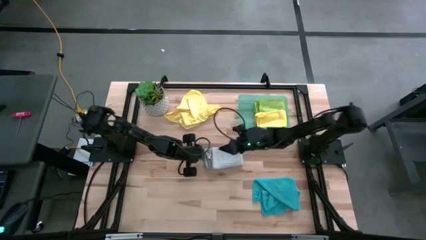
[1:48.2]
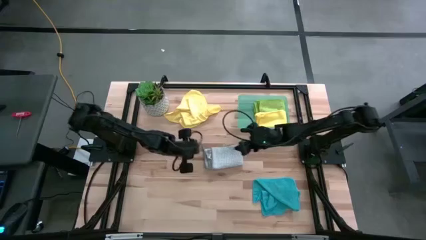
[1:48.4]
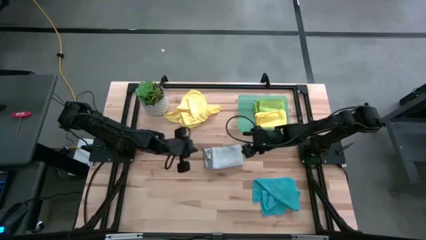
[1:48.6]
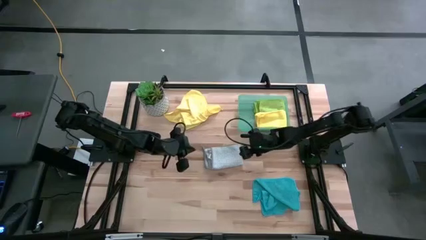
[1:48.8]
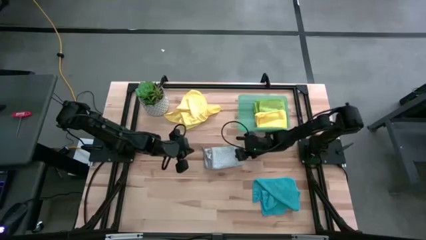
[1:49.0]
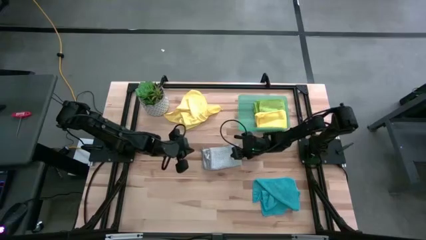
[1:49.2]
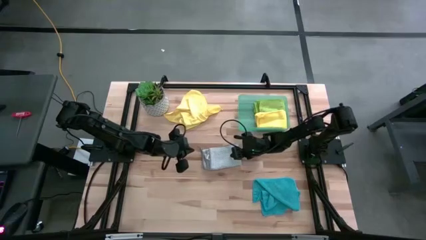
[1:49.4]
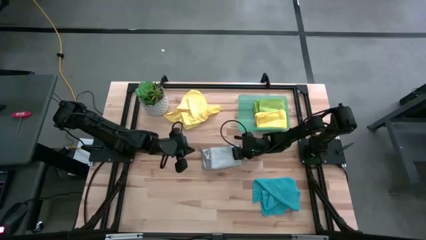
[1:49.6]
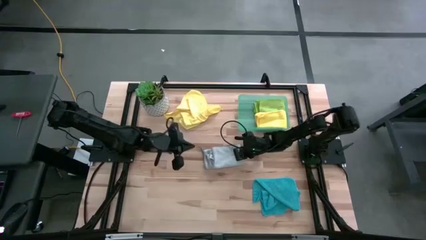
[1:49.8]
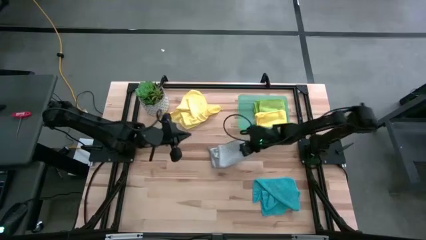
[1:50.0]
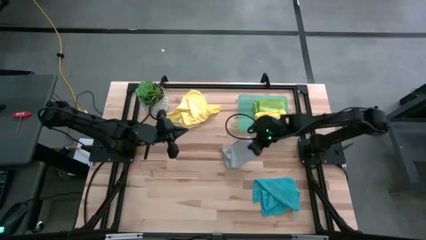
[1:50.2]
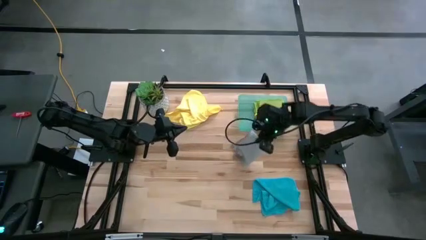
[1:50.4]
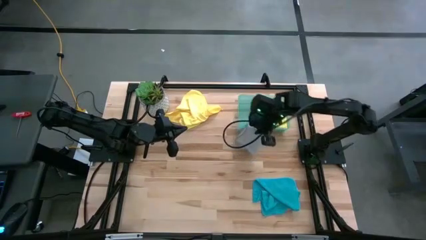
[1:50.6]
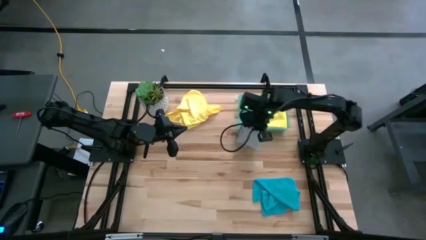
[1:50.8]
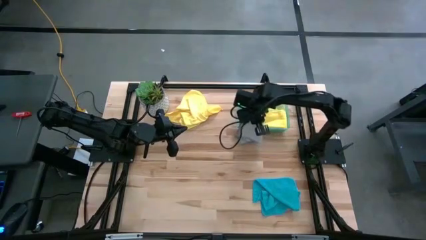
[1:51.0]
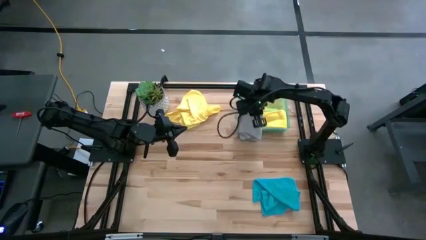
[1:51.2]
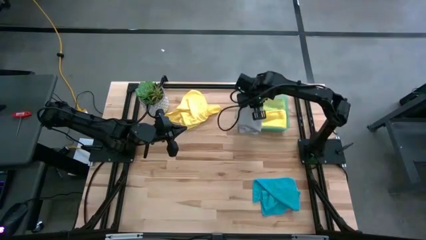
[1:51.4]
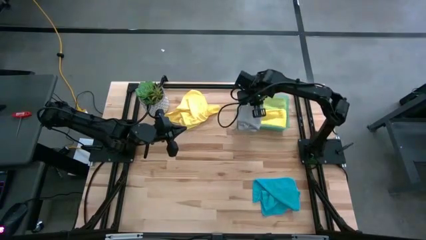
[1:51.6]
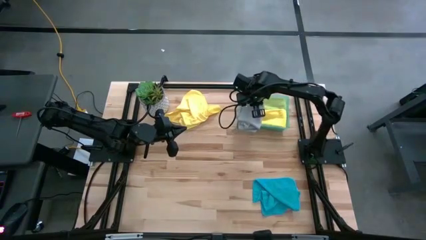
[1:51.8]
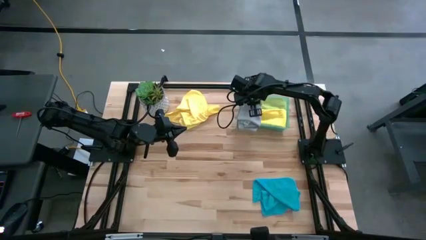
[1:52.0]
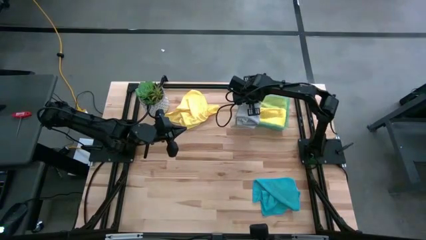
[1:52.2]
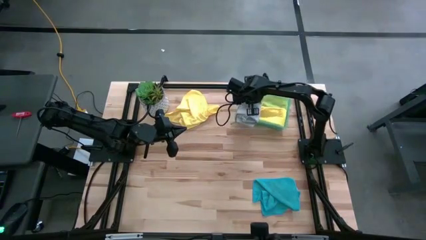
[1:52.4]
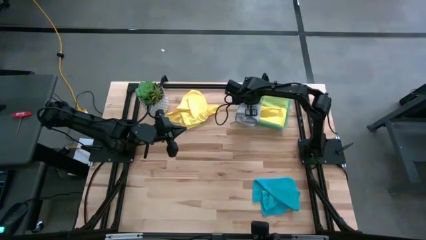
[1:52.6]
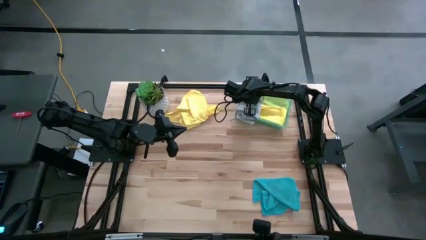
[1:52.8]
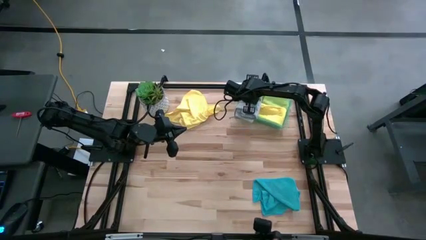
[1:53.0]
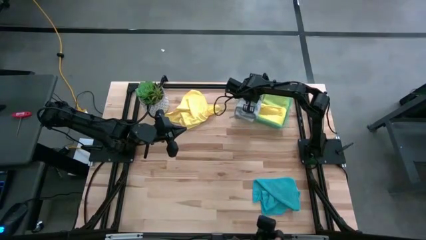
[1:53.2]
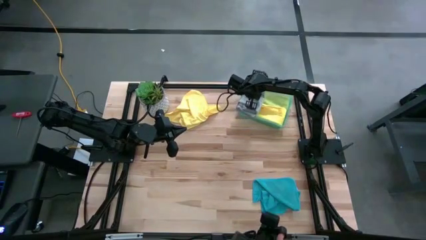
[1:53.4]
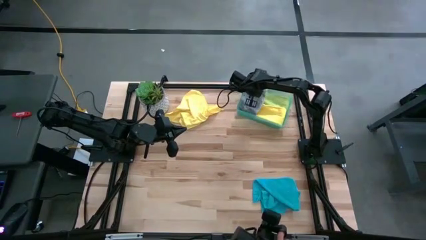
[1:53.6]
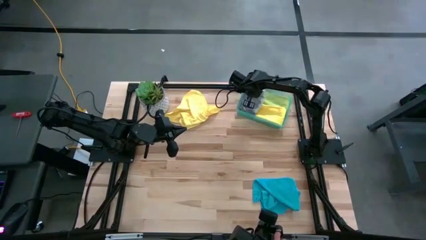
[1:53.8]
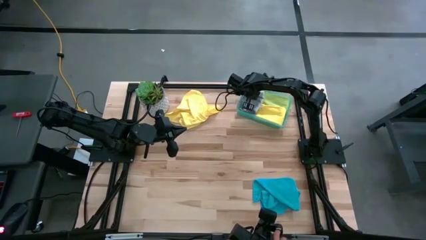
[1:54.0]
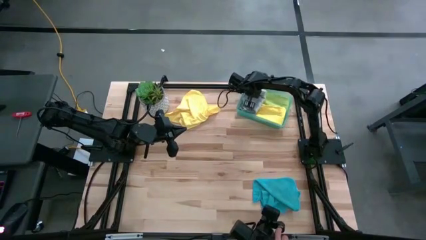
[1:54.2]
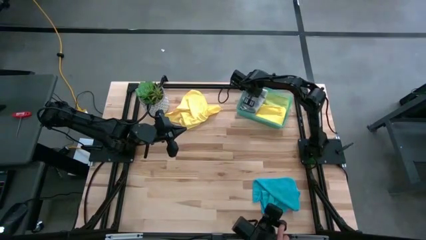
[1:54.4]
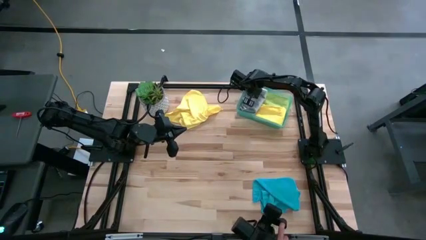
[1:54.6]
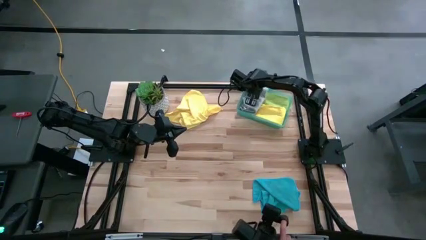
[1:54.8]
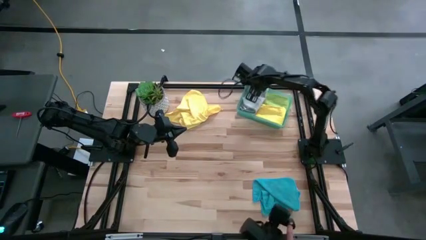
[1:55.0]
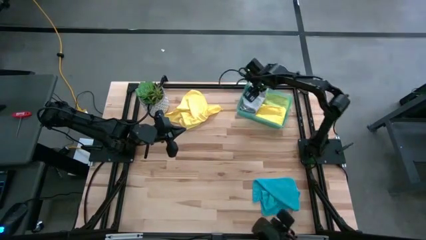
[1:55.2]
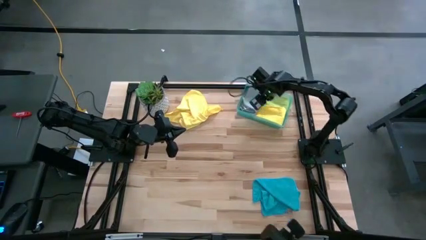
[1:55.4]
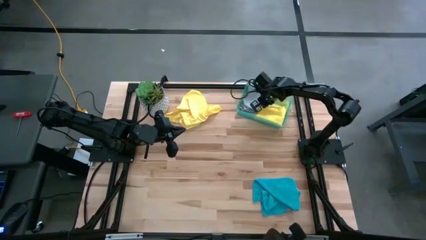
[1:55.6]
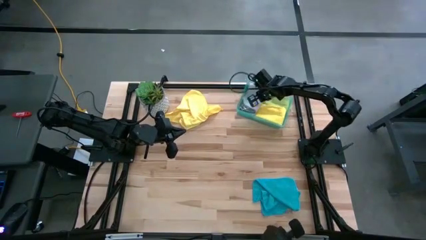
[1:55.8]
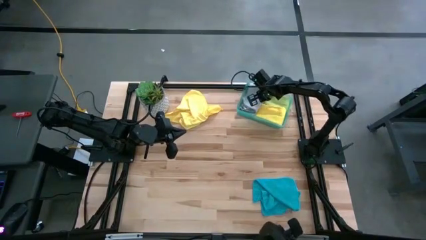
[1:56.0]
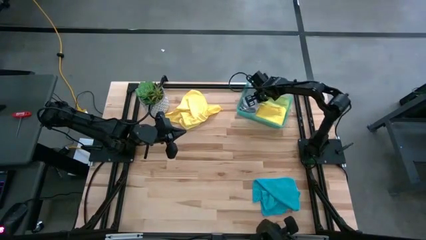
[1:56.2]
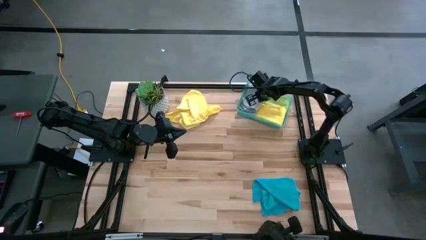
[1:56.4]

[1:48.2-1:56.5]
Task: Fold microfiber towels
Put the gray towel into the bin

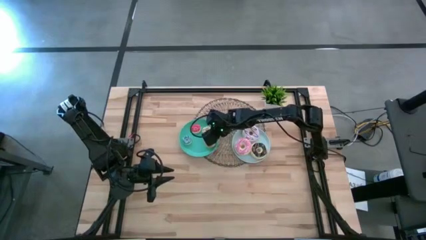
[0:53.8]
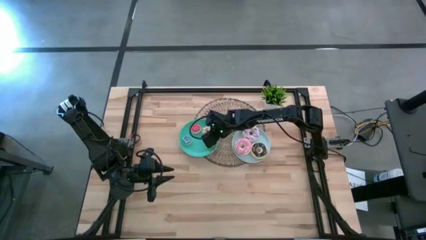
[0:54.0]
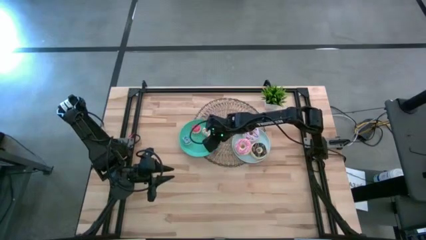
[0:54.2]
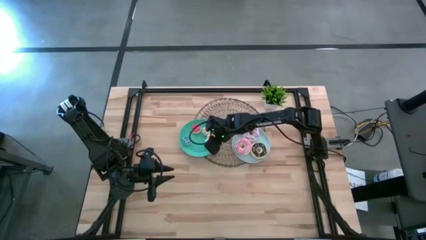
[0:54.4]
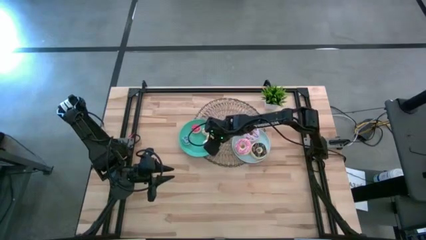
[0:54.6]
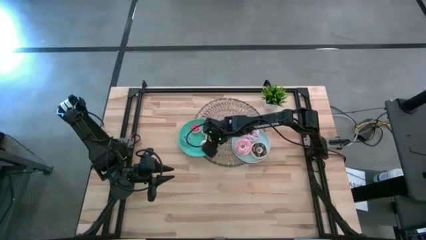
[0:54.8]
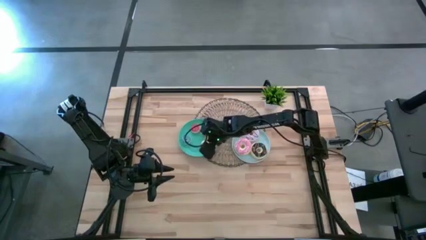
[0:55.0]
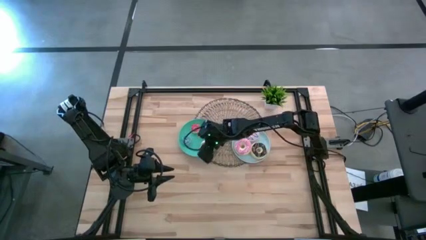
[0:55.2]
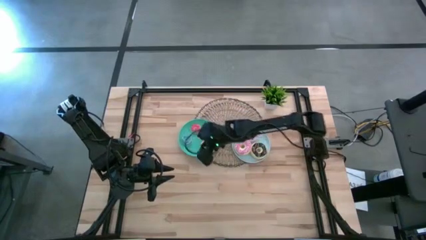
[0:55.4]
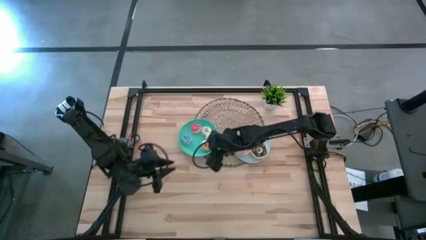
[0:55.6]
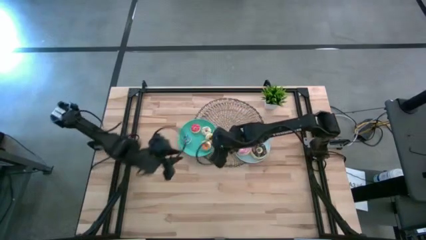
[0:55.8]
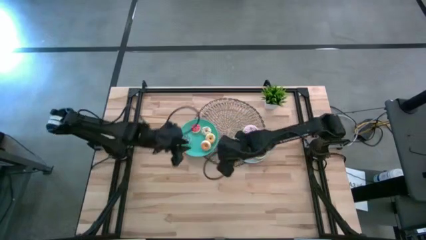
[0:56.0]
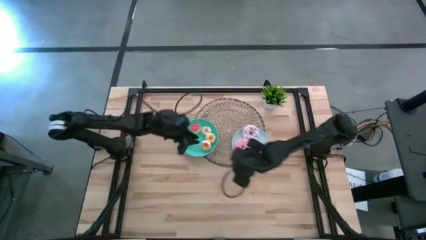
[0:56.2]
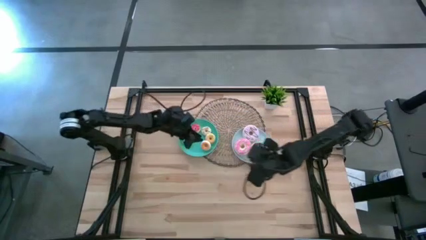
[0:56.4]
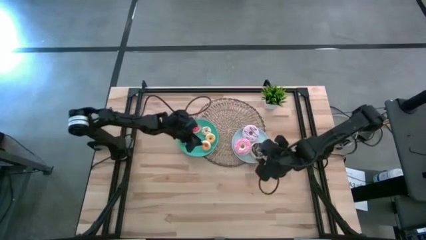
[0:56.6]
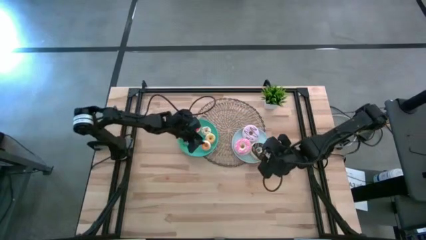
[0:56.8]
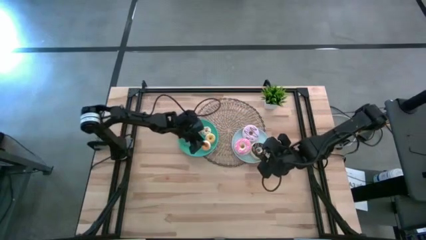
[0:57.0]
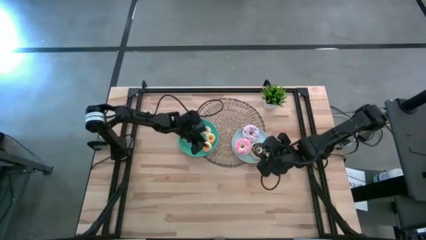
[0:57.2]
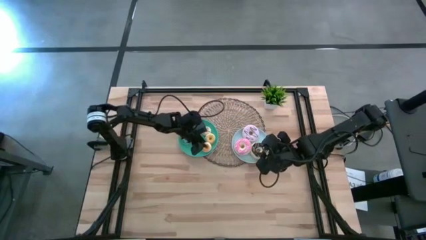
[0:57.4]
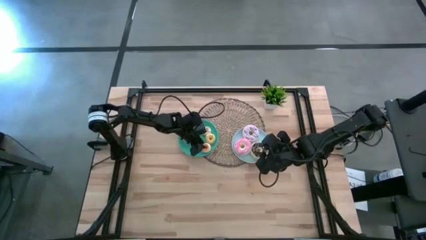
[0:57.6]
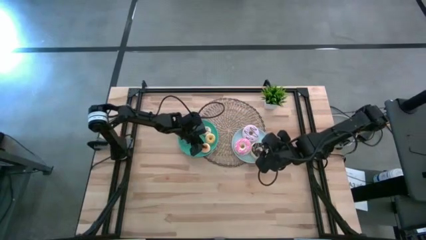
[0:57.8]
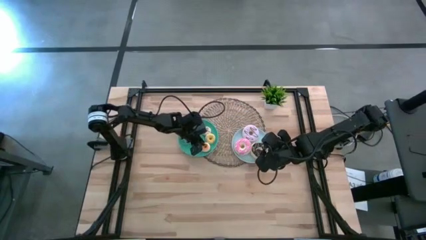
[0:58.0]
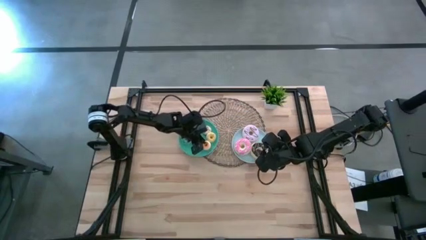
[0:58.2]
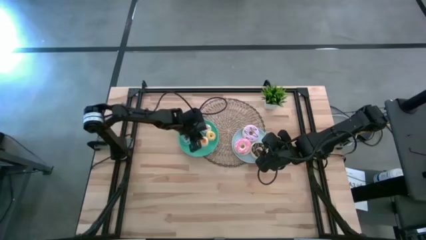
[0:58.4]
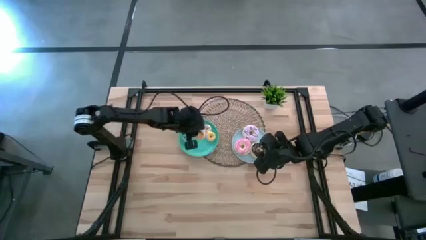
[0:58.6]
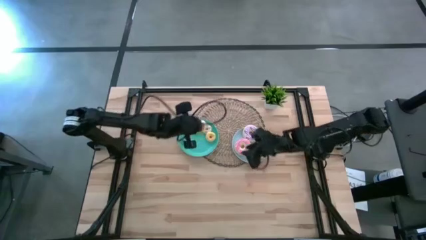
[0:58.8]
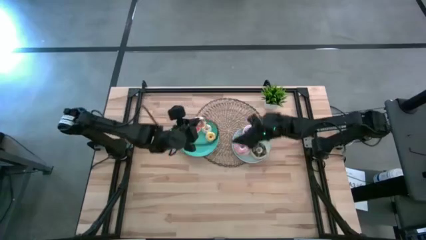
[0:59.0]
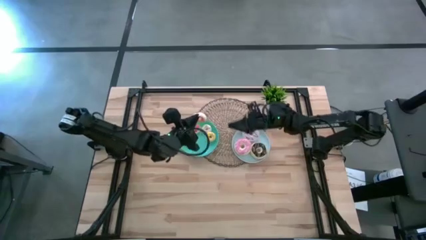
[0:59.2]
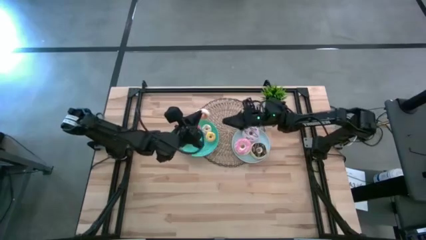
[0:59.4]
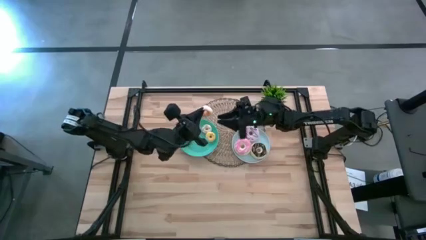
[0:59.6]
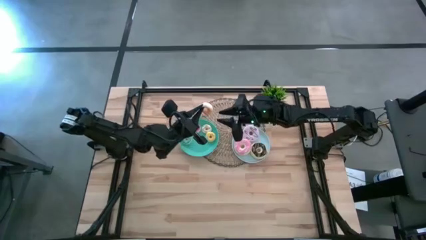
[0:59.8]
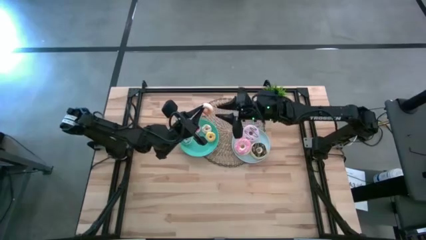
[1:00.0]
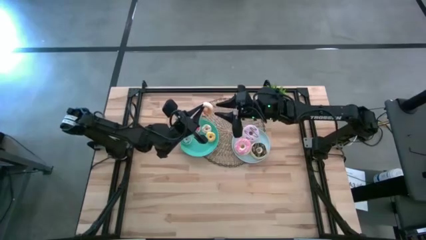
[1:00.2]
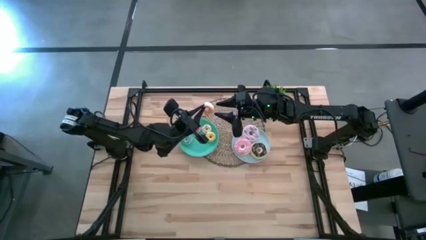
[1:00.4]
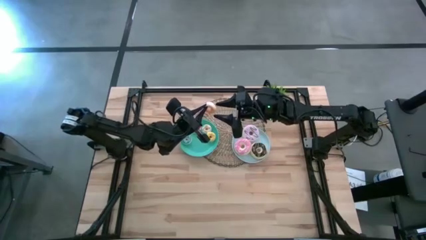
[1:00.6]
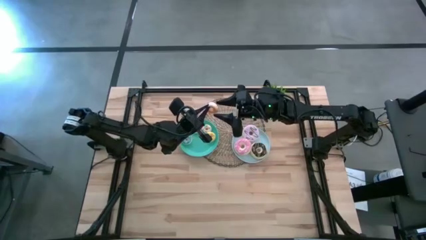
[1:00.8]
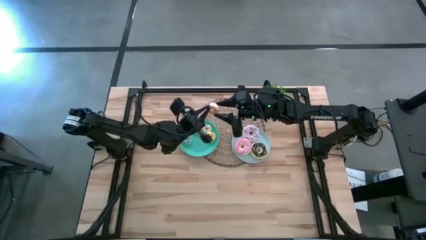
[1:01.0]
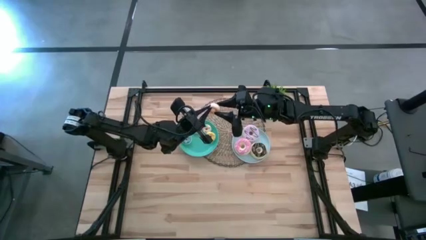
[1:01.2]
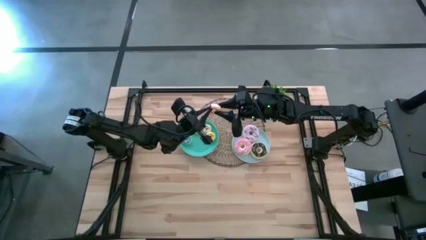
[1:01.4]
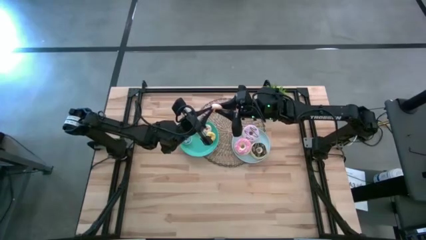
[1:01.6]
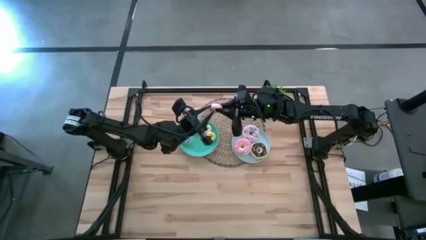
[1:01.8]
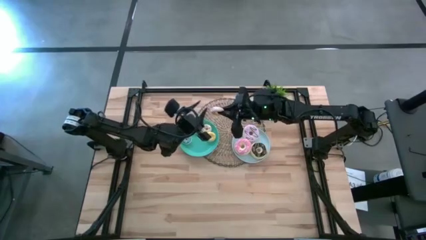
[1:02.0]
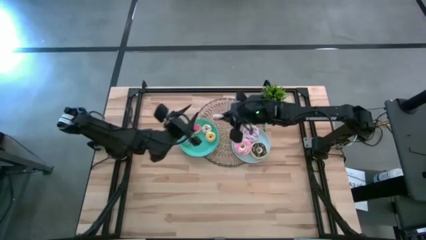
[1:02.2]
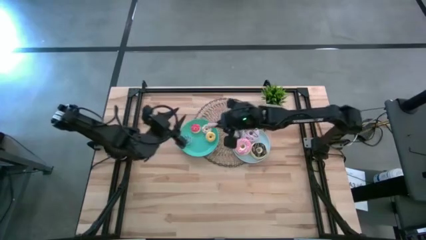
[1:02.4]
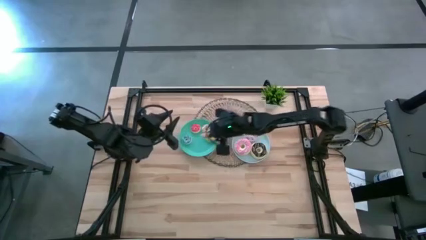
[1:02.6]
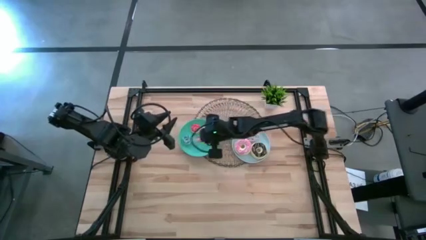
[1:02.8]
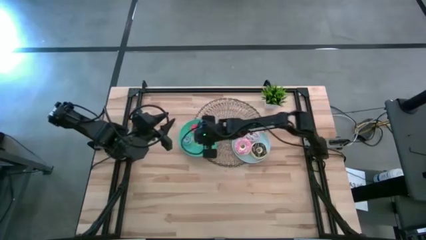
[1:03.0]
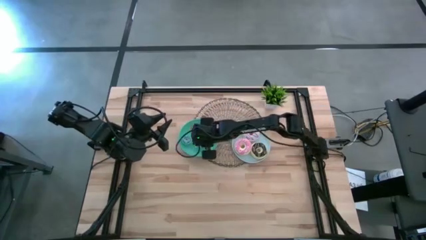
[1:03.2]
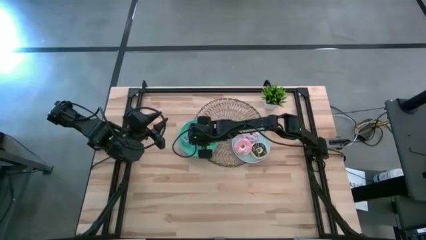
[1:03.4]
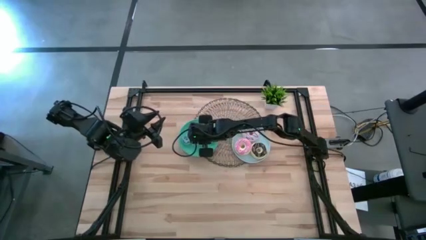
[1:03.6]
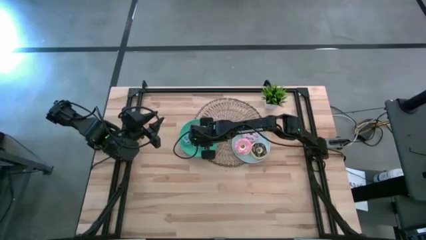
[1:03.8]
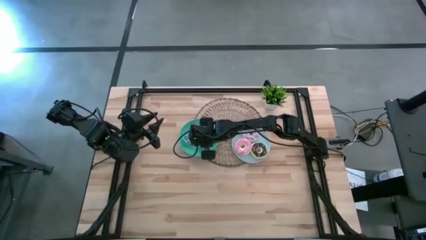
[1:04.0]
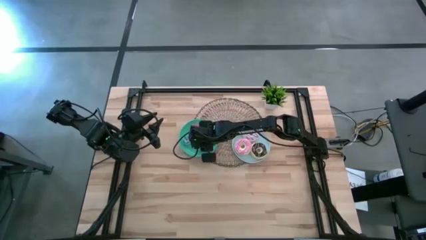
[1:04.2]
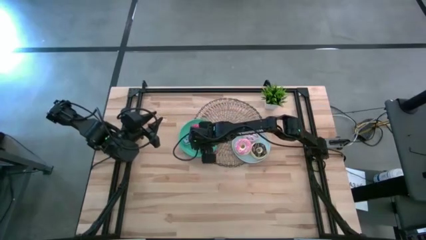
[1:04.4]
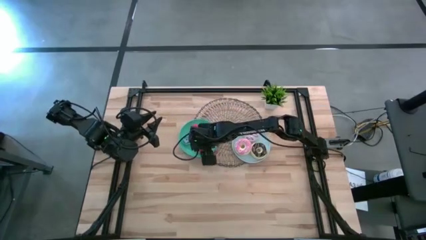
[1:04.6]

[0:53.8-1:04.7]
Task: Pick & Place donuts
Adjust the small red donut on the green plate
